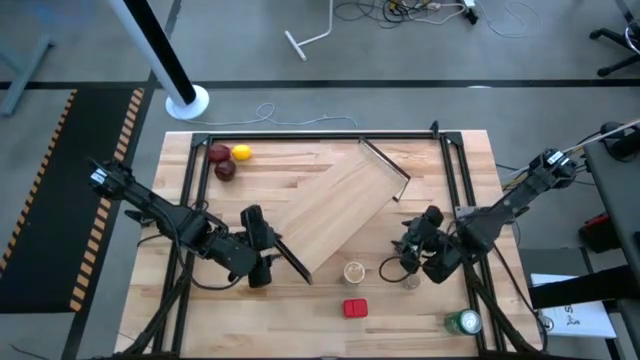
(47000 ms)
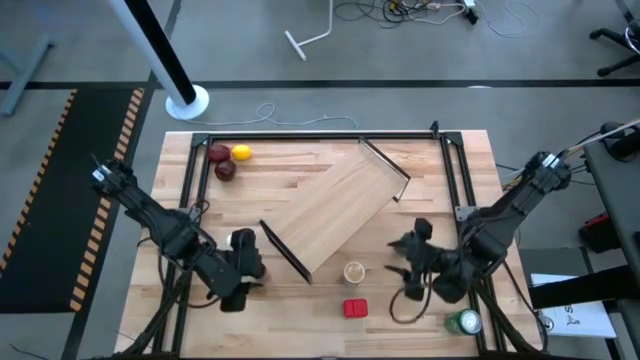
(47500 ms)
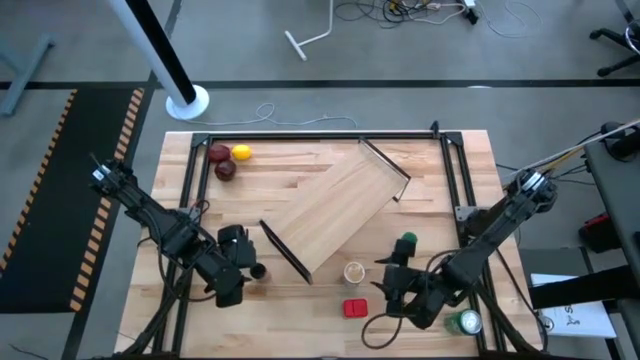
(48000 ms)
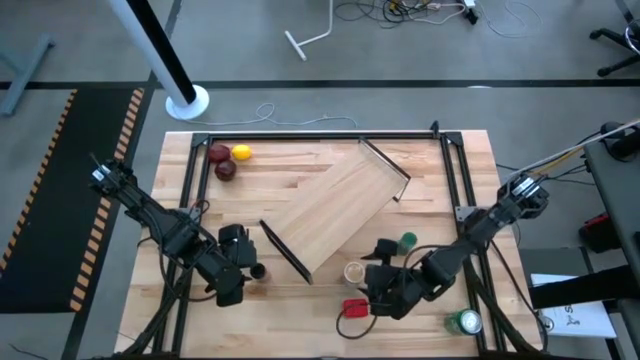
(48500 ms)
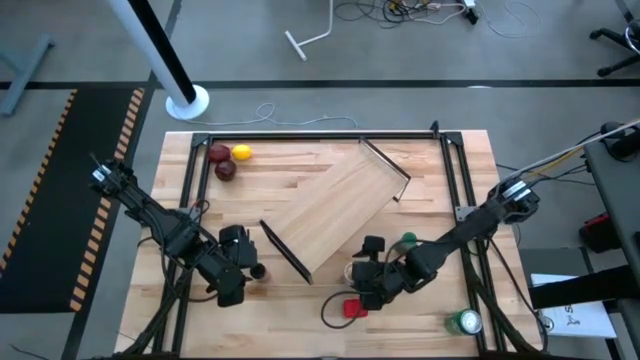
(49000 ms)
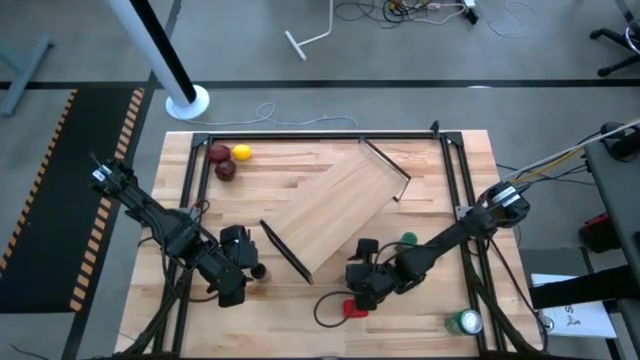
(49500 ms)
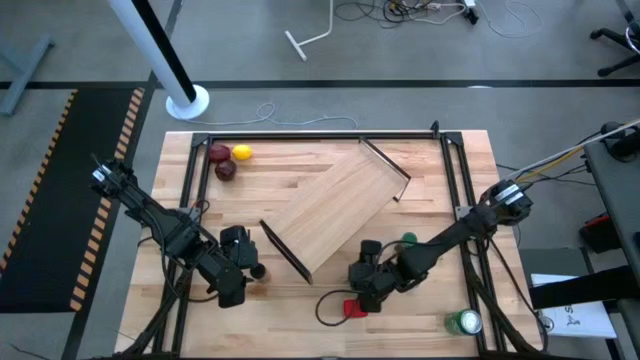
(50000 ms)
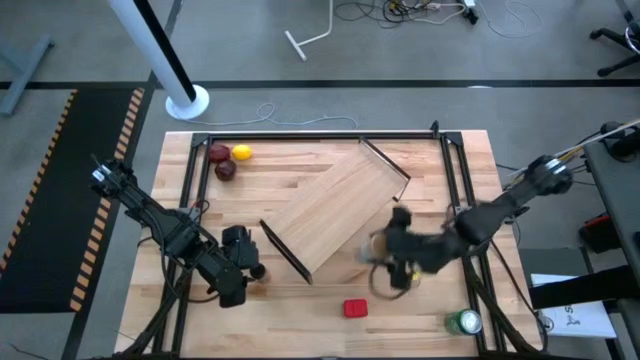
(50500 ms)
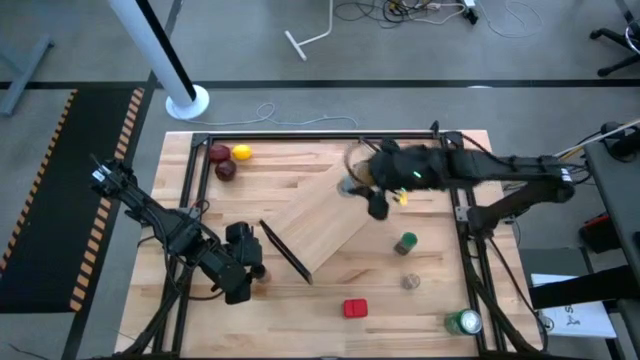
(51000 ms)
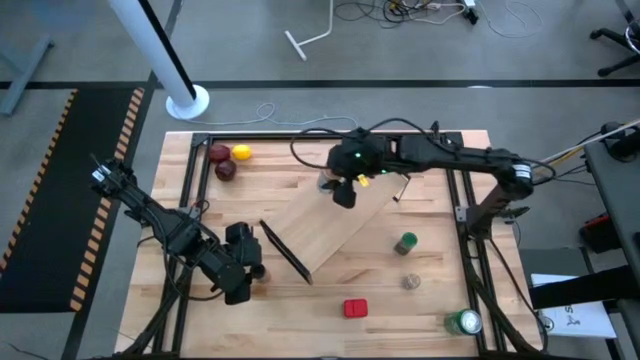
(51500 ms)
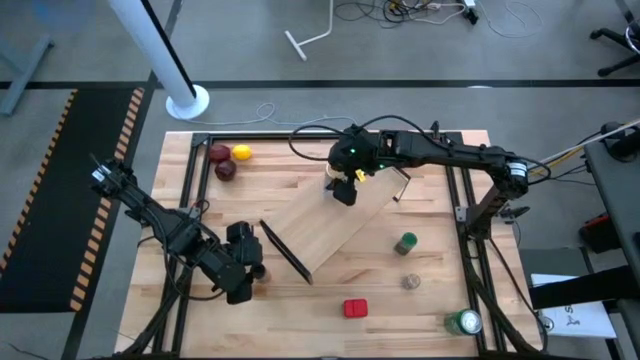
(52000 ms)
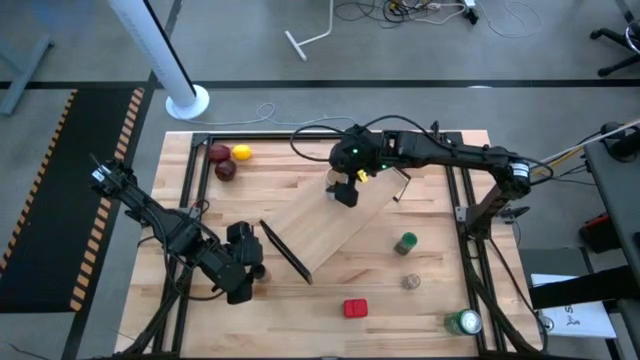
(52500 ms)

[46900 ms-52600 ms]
Task: Shelf spices
Put the gold seasoning bottle on the shelf

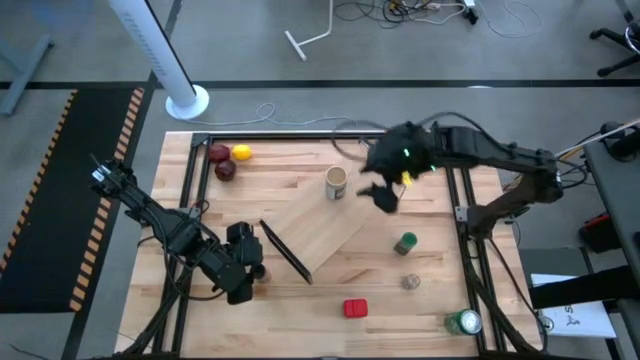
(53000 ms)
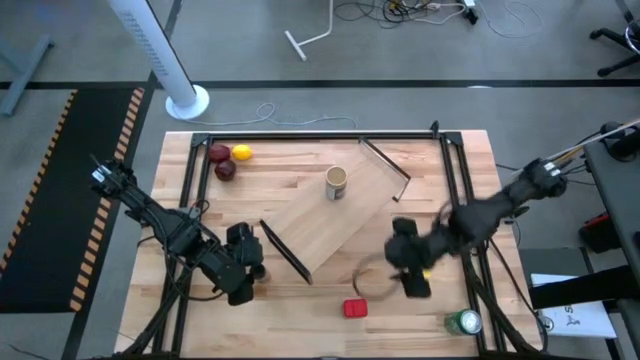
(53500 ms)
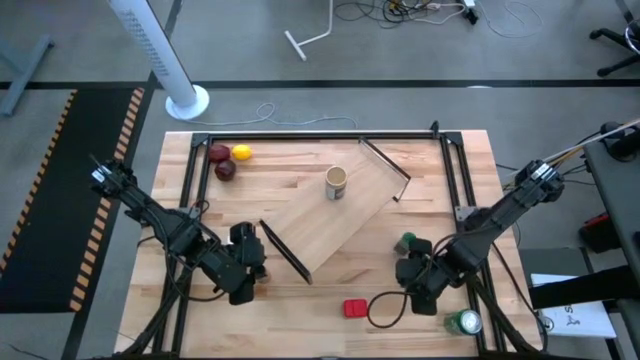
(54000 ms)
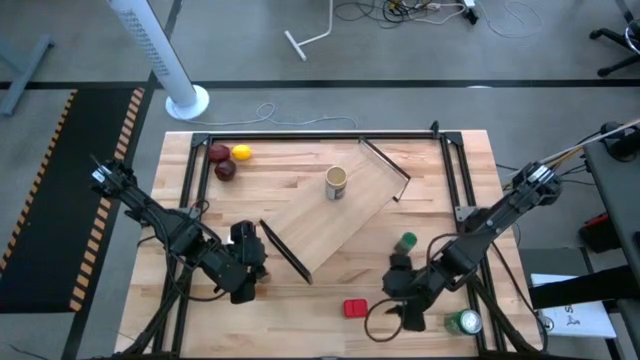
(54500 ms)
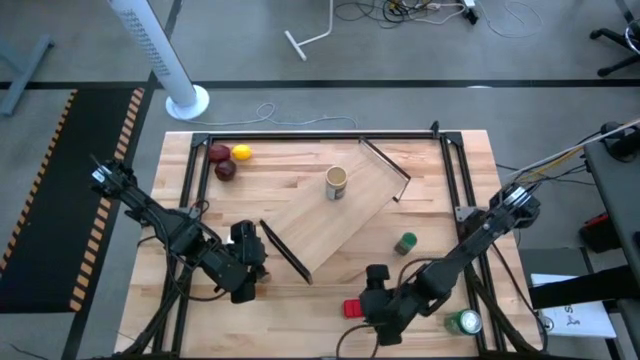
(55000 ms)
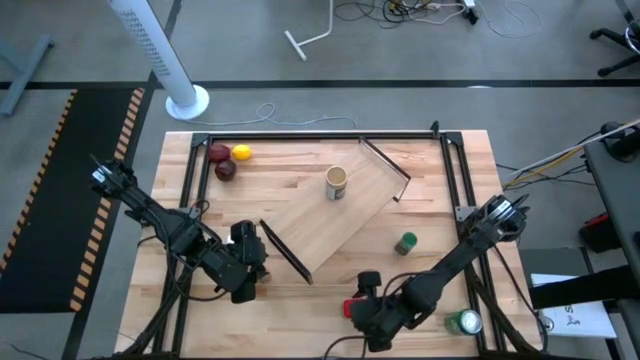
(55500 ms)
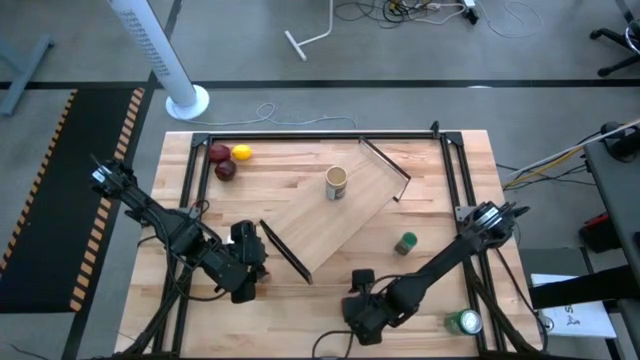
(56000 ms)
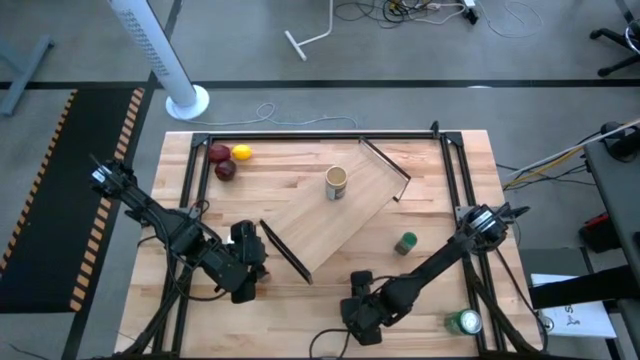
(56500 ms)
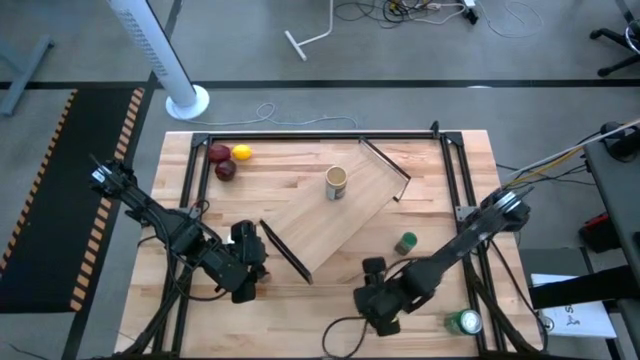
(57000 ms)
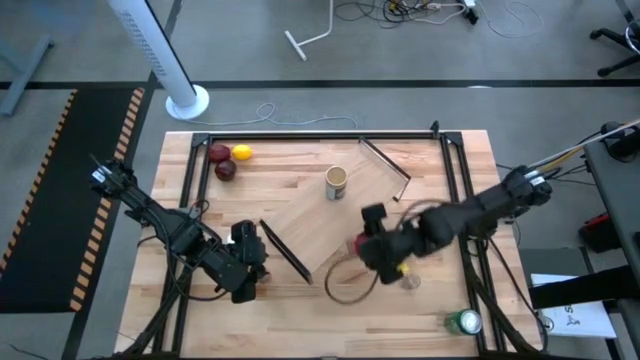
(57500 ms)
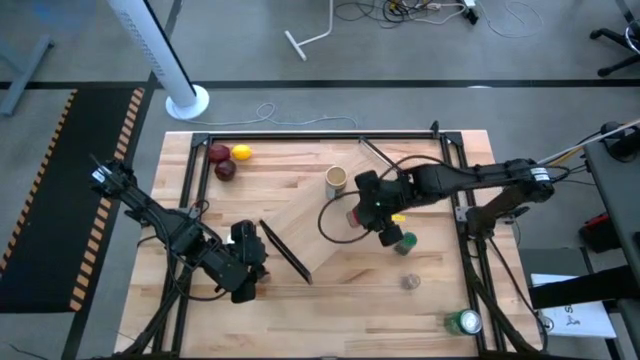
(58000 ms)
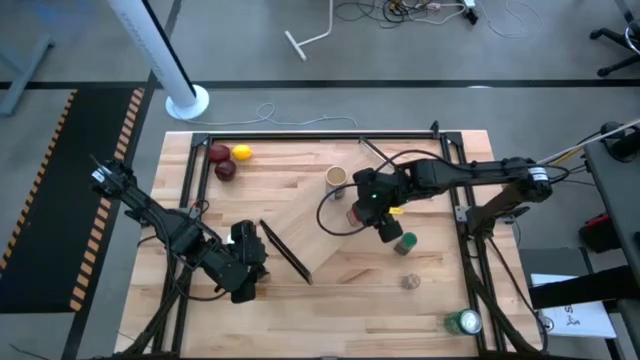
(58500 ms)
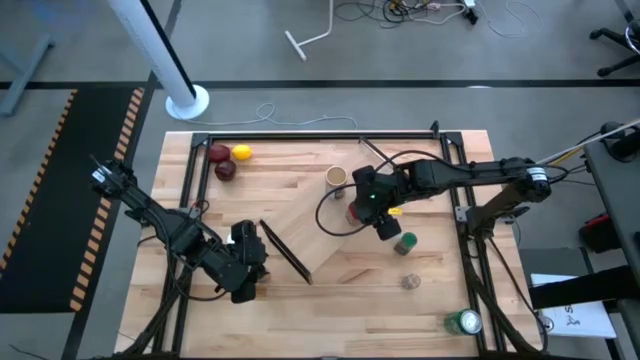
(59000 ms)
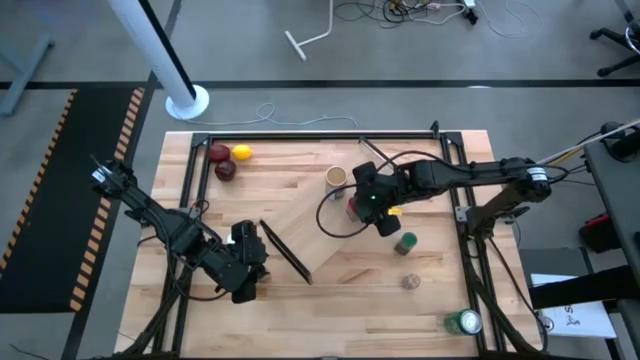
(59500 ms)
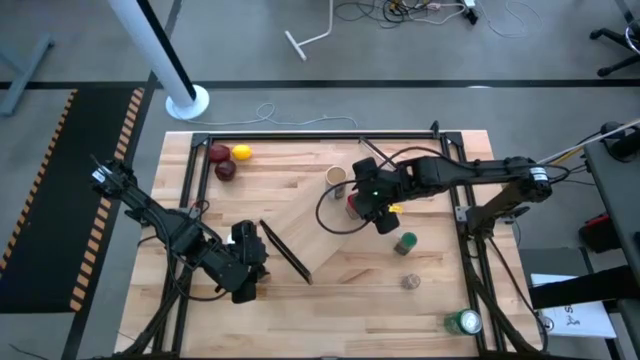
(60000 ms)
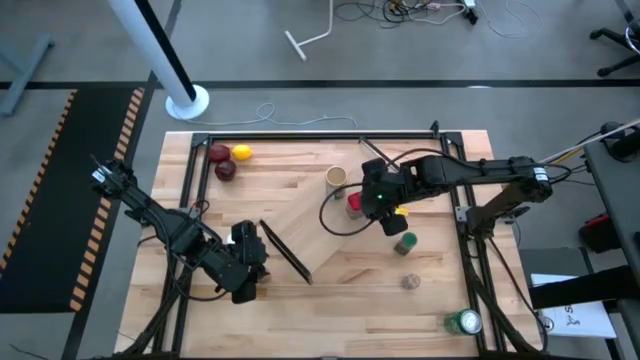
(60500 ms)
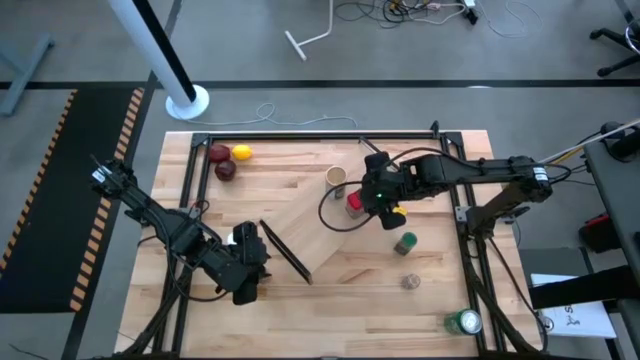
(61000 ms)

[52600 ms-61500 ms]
Put the red seasoning can on the shelf

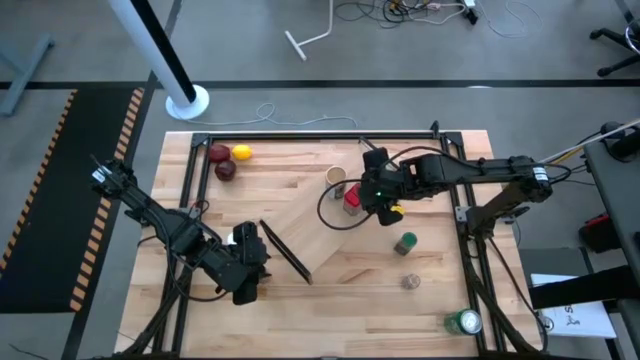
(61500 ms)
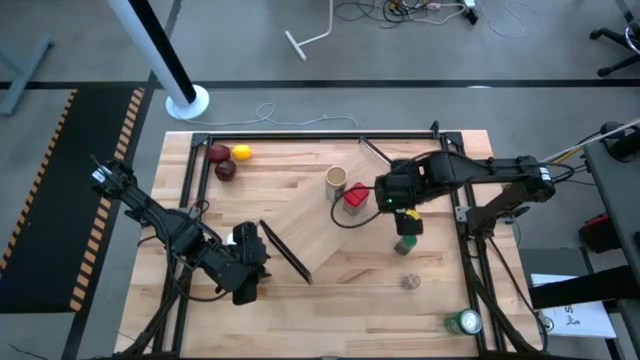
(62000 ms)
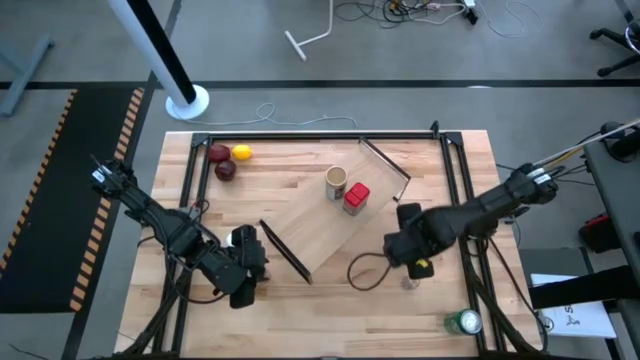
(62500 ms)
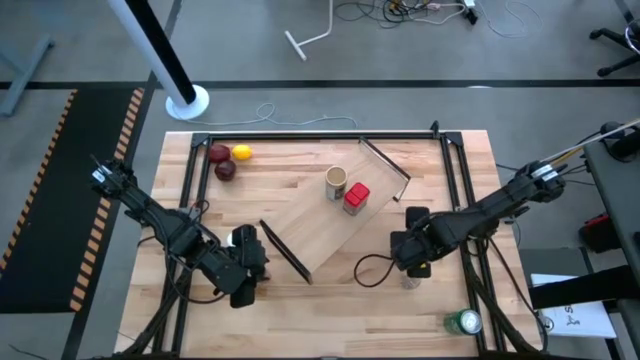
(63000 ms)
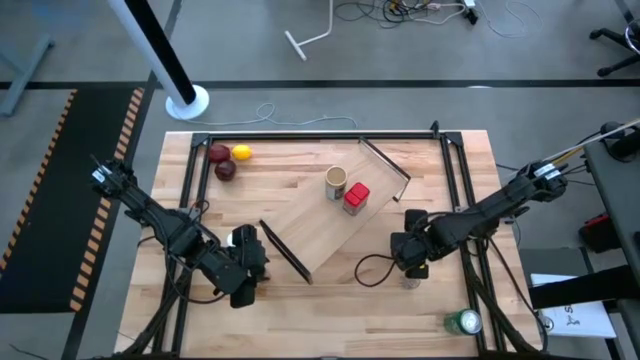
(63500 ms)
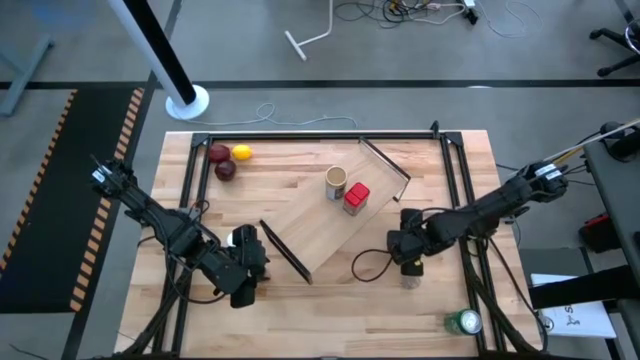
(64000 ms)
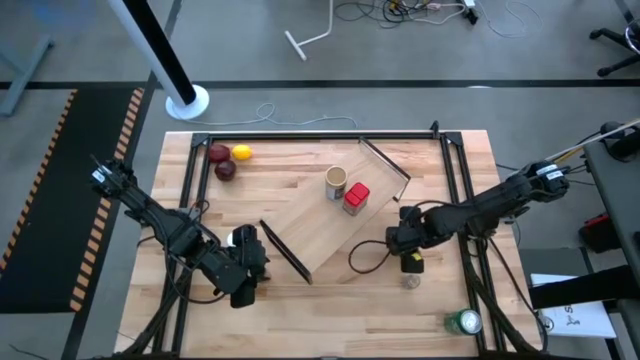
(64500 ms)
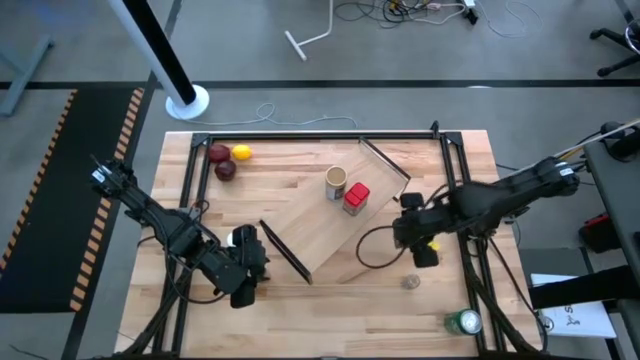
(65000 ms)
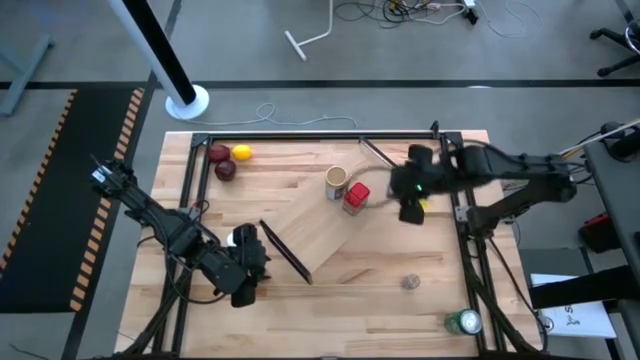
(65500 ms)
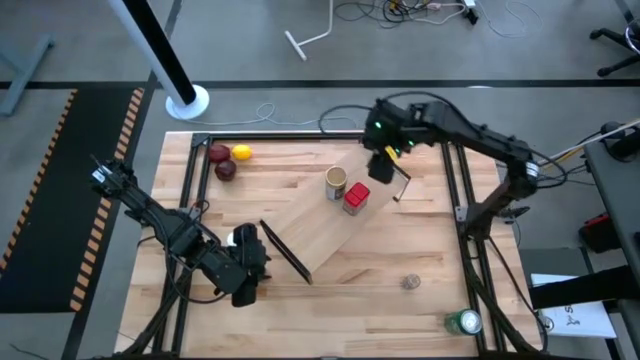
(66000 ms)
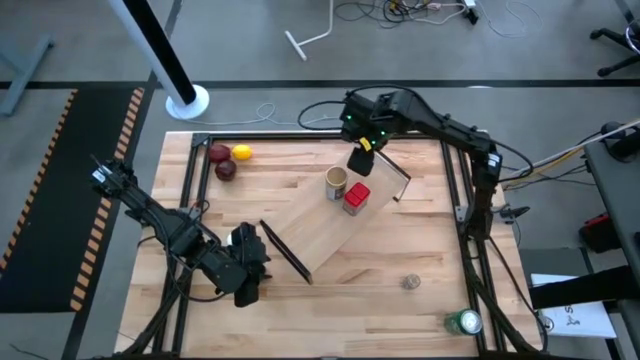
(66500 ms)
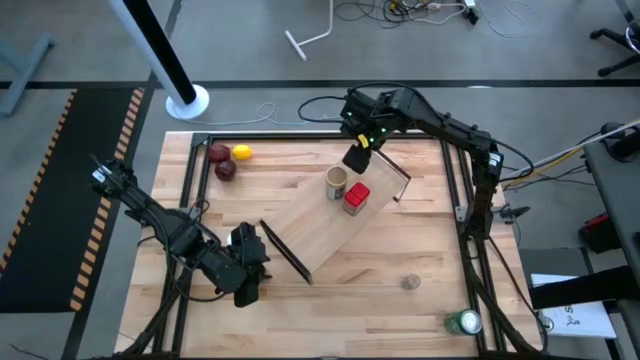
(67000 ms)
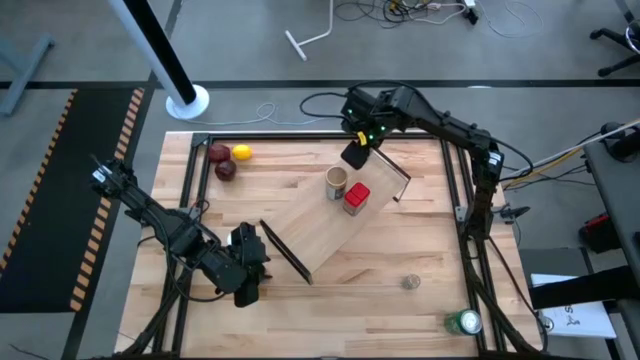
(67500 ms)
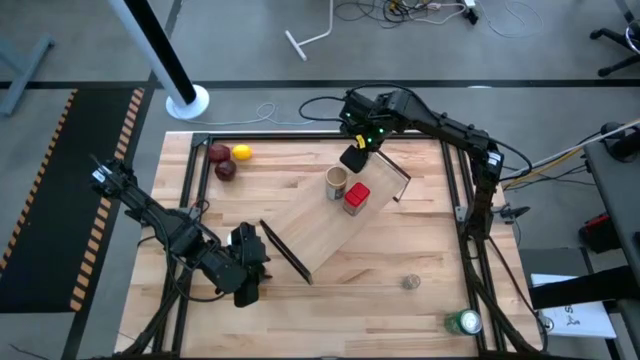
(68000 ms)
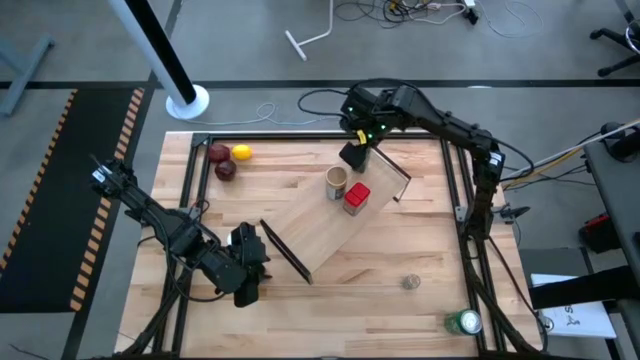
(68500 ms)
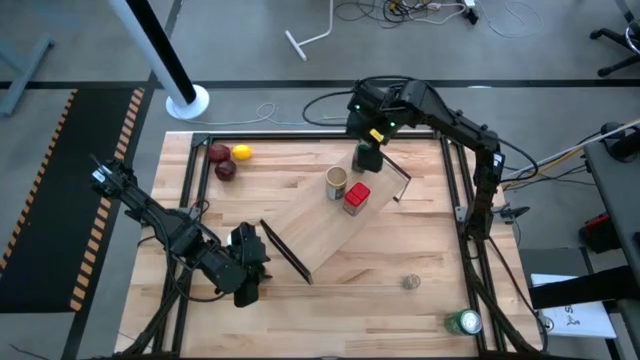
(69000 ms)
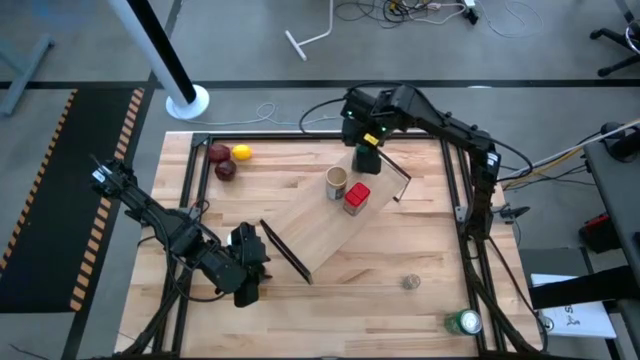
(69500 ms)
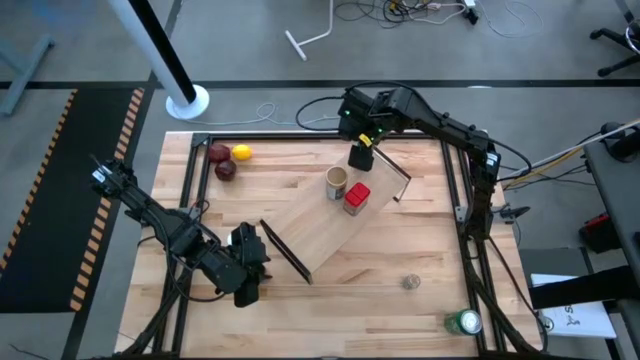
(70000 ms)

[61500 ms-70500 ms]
Put the green seasoning bottle on the shelf
